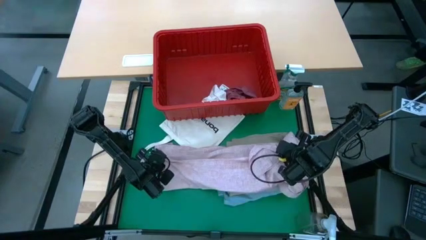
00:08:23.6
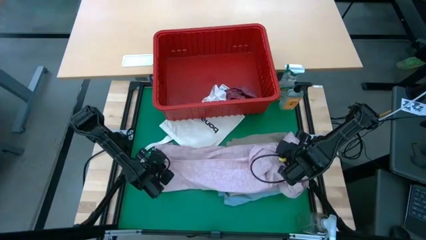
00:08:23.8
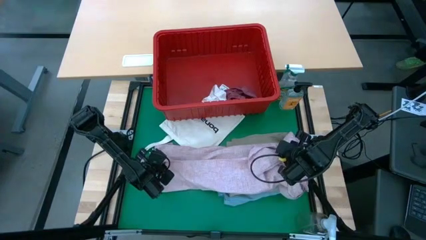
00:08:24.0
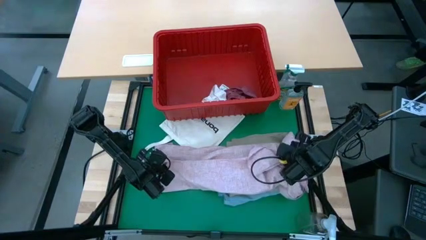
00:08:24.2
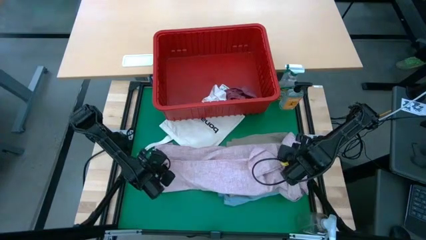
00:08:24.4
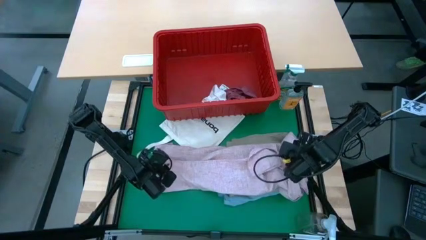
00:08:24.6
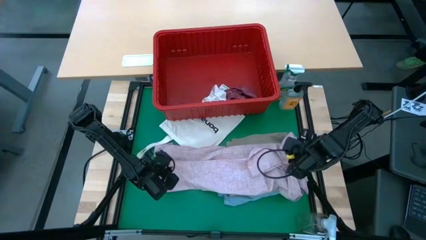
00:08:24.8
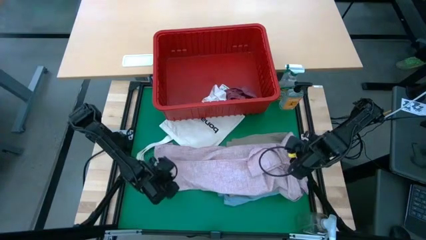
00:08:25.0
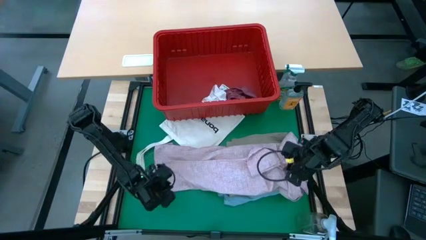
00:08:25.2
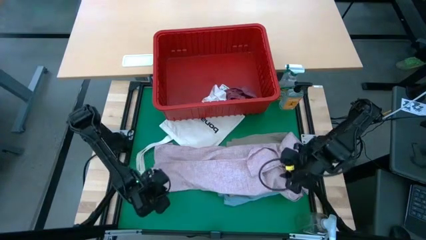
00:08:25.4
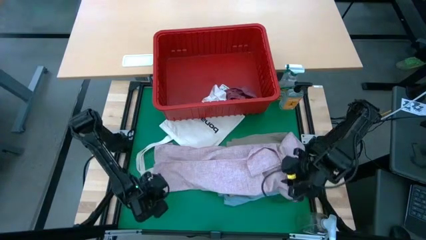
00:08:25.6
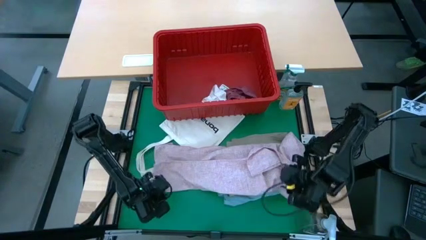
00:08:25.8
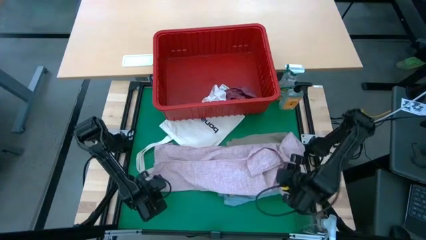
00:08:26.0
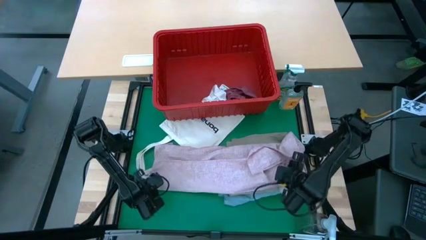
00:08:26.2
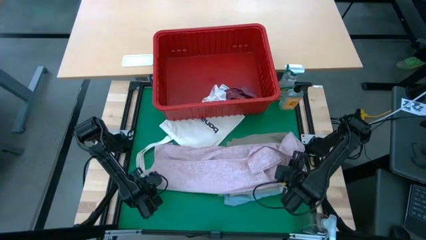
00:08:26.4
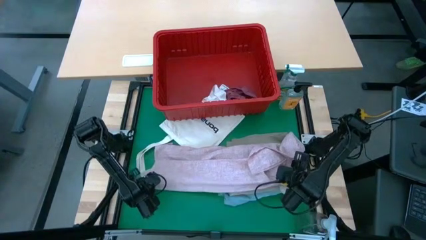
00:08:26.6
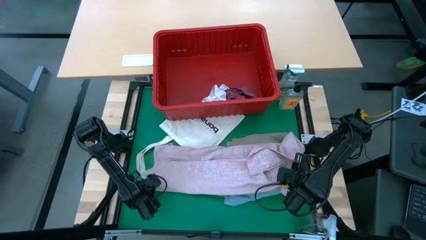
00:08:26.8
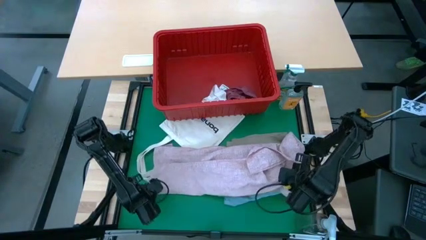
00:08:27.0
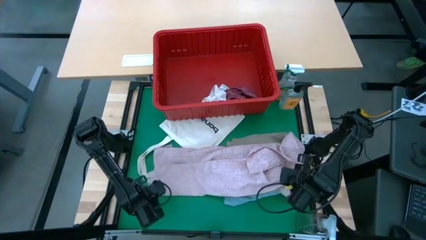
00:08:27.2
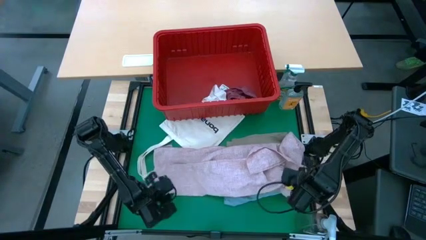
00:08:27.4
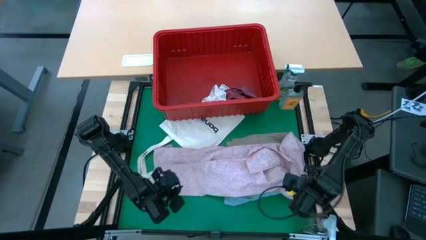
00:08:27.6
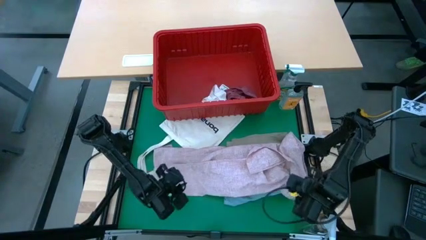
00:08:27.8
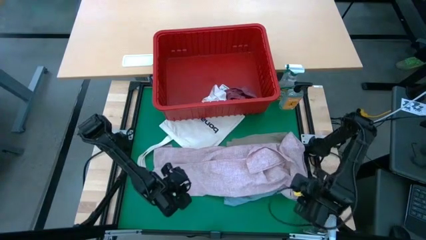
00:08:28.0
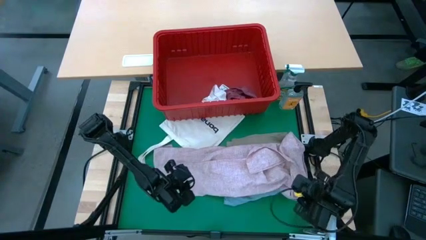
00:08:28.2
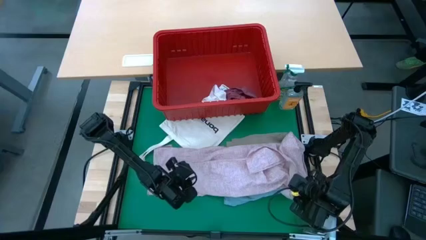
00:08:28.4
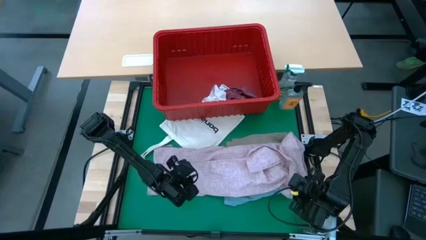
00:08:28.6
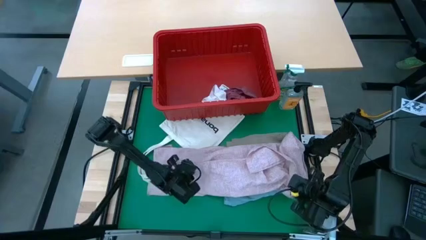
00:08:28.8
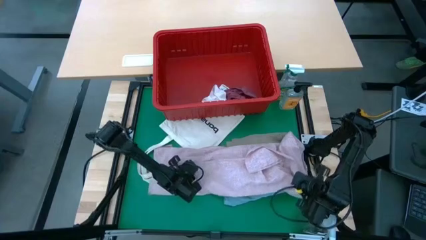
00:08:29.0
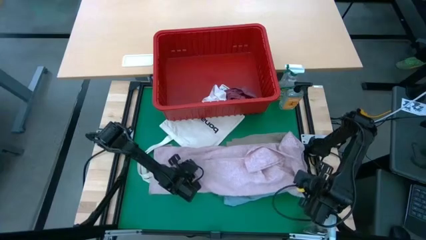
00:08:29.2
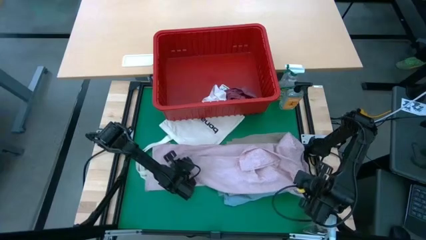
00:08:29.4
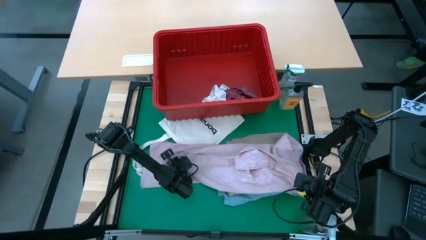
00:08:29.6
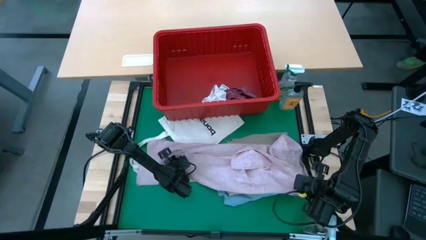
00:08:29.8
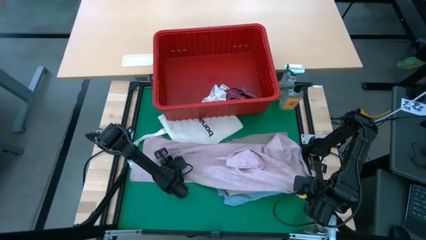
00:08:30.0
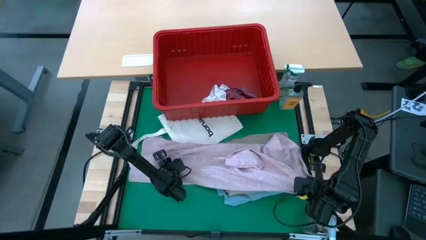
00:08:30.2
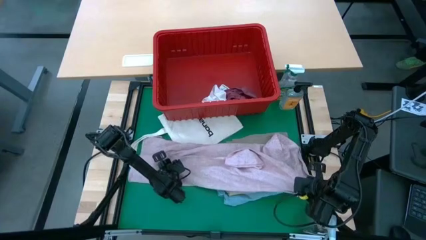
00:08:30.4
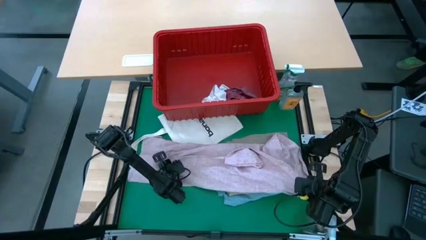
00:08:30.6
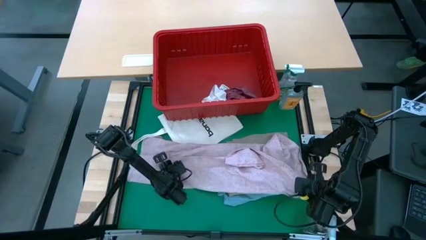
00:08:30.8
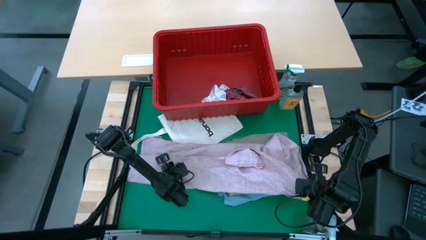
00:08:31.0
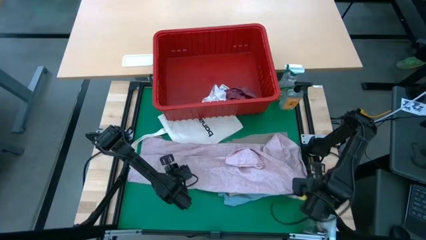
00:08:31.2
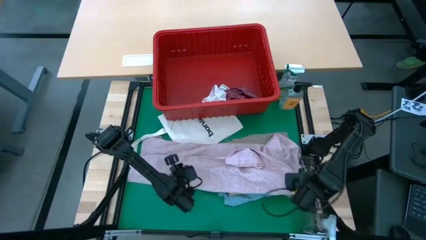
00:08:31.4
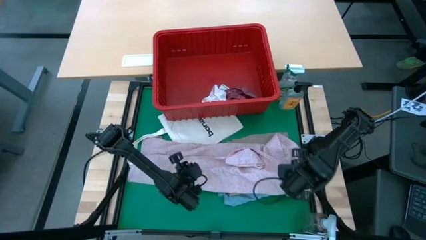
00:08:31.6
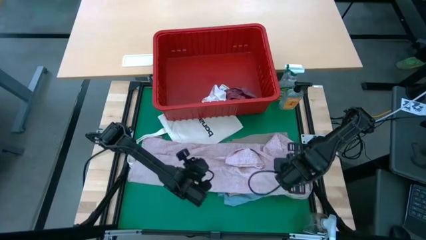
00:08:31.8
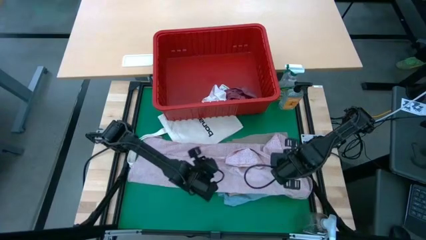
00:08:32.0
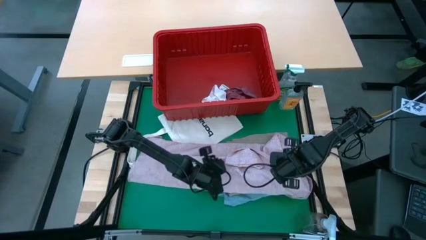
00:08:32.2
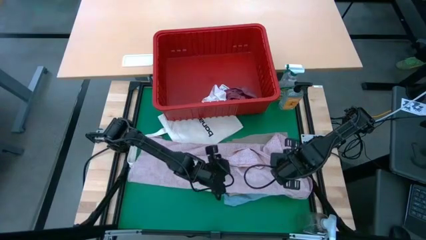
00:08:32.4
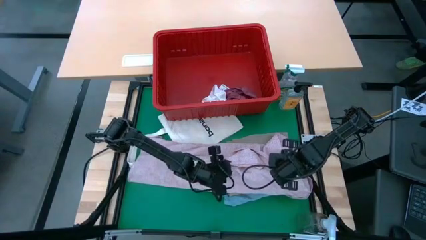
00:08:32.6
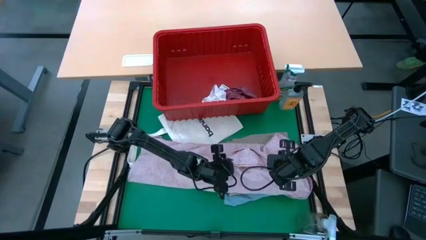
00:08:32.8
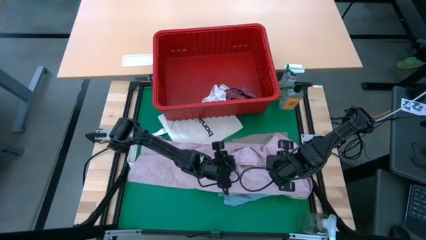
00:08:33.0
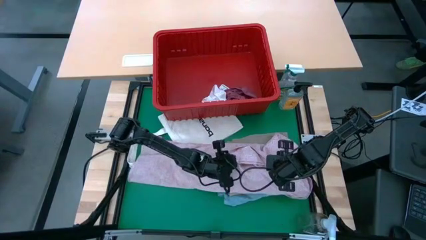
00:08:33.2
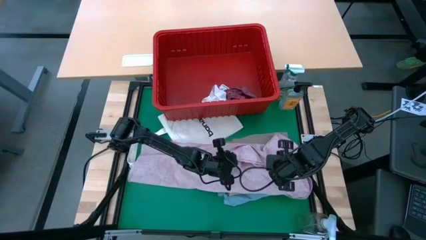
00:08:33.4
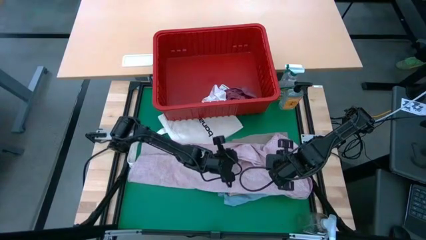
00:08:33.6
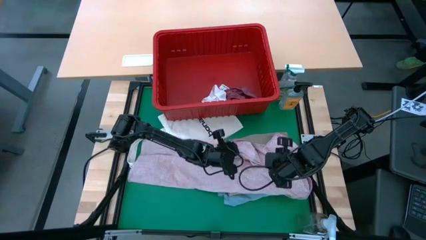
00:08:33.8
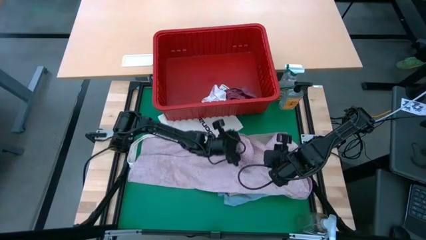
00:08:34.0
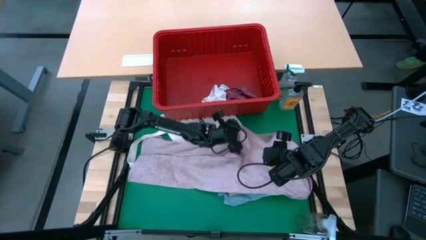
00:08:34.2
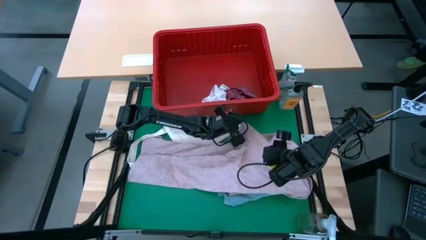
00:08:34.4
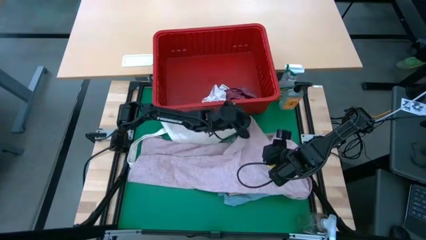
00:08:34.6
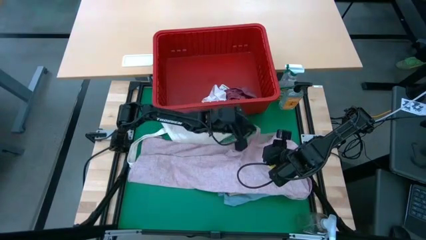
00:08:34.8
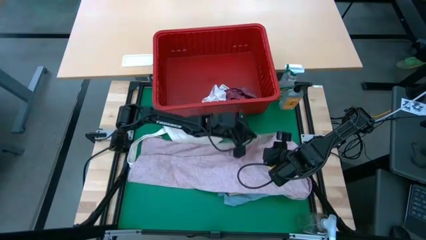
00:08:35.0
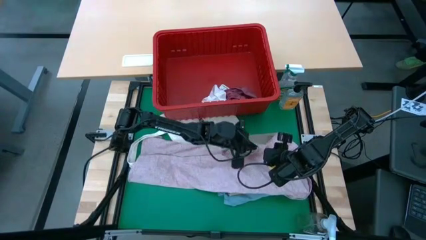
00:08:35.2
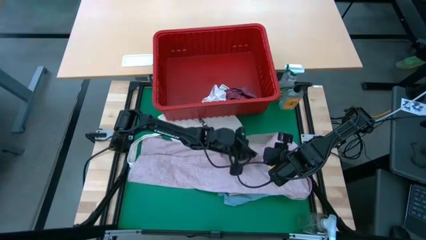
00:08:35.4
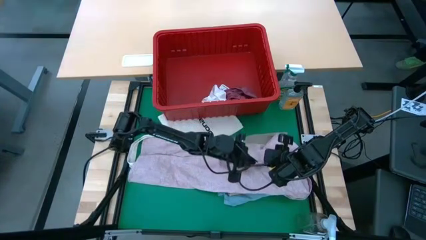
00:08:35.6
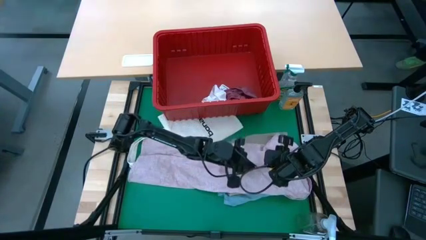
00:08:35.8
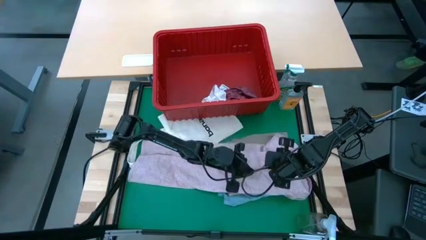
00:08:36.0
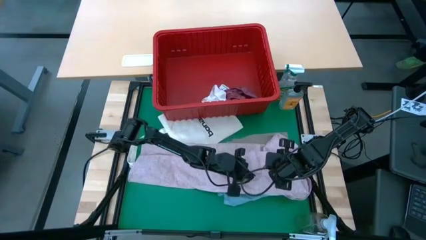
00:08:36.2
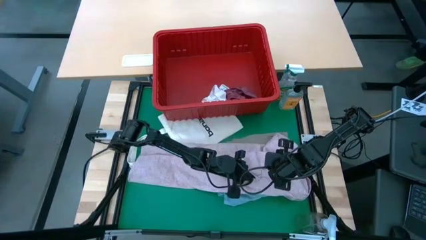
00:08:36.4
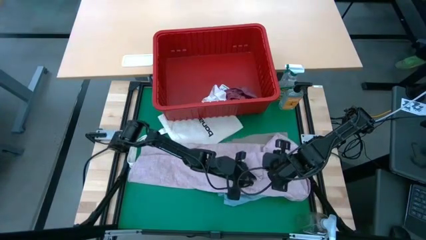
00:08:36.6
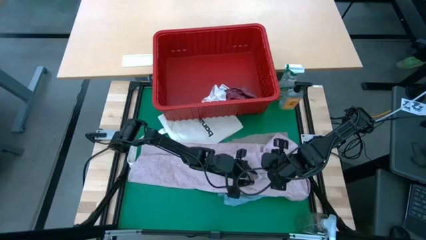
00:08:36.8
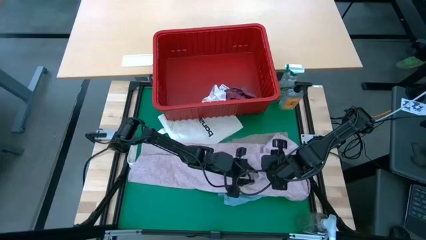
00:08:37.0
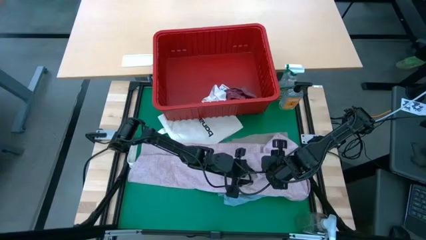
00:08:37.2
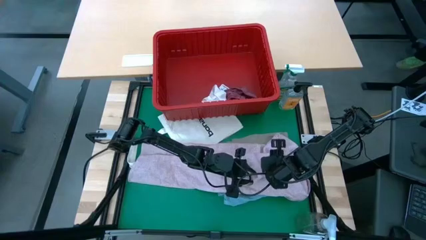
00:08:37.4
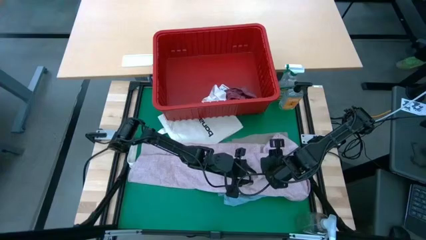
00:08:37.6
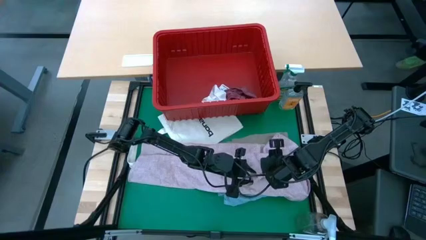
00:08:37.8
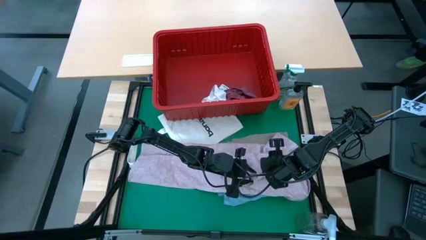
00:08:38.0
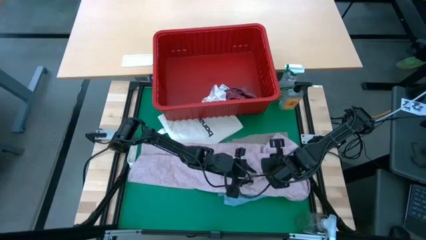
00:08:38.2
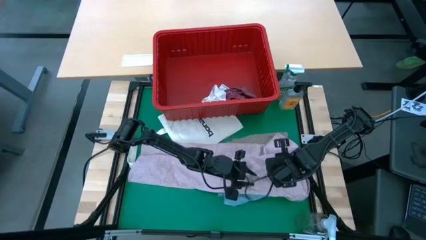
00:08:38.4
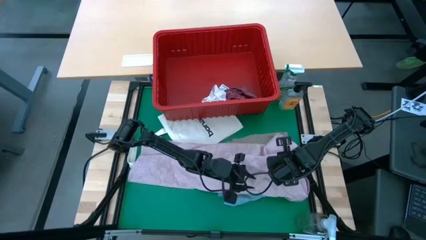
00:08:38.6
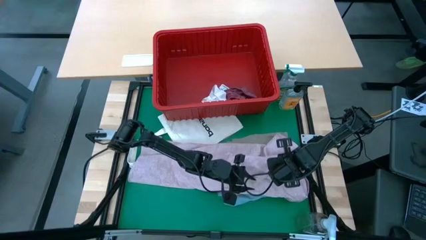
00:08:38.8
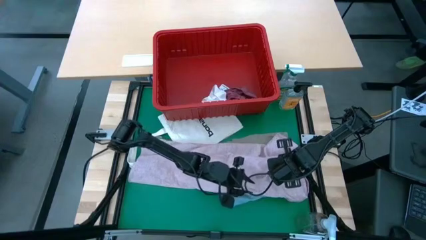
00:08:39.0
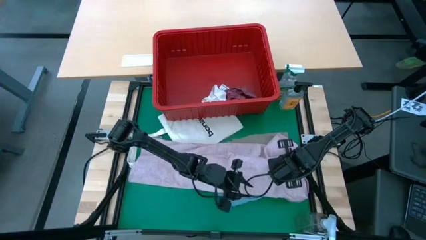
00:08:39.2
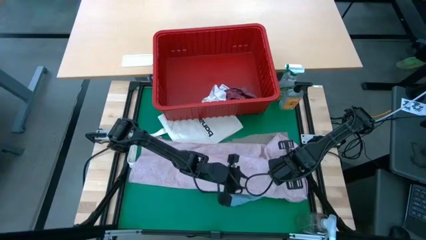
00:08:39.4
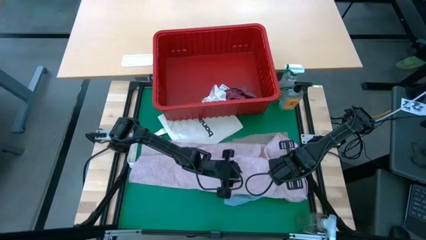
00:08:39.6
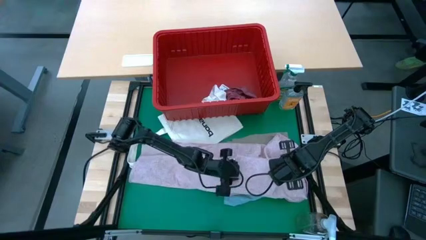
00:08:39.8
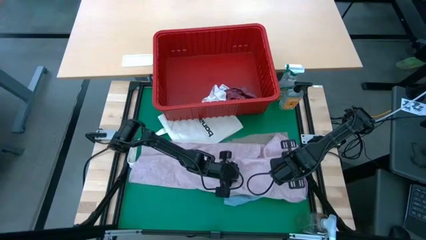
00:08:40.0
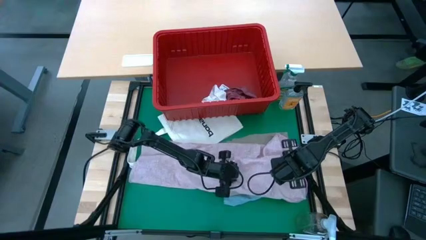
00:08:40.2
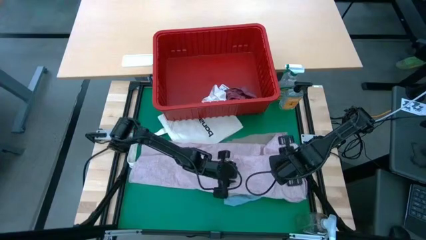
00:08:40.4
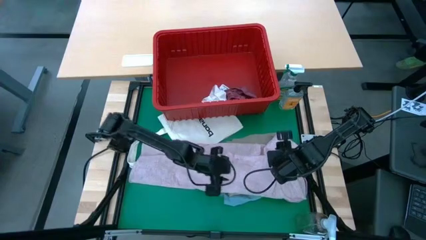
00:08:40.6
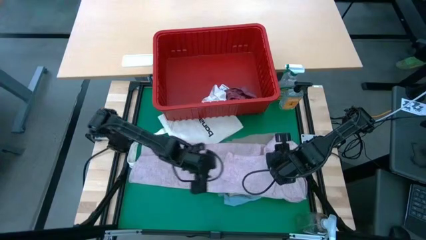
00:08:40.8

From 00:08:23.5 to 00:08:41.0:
Task: Fold laundry
Fold the pink shirt
